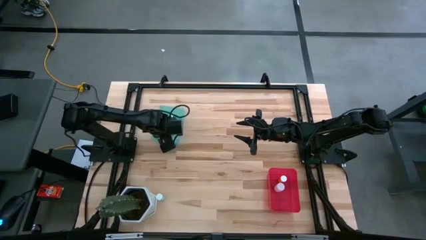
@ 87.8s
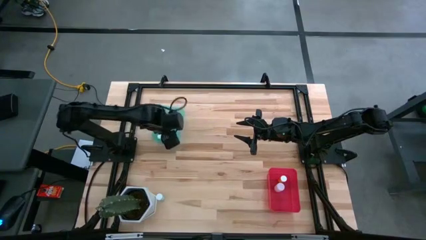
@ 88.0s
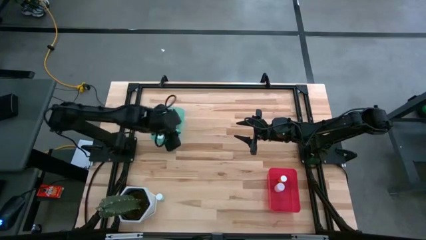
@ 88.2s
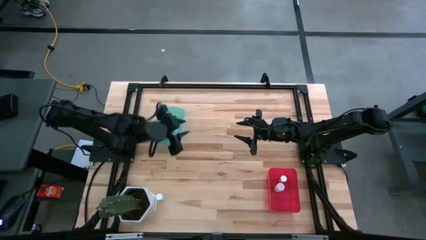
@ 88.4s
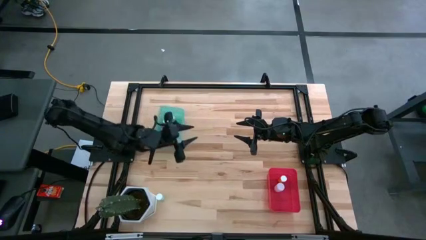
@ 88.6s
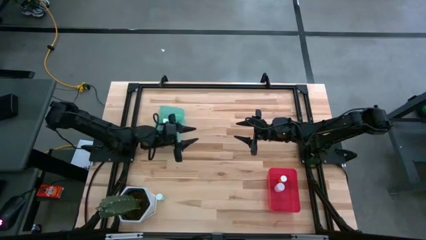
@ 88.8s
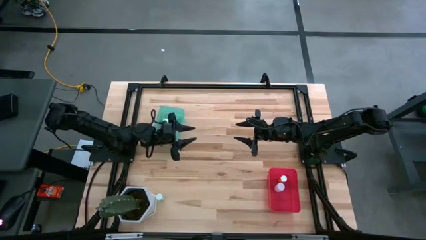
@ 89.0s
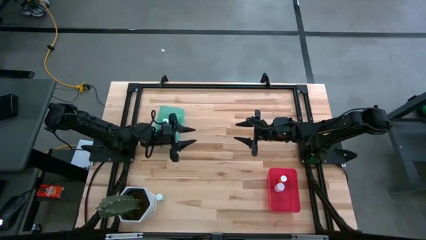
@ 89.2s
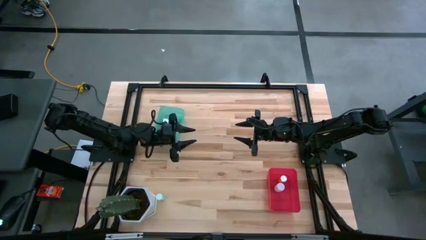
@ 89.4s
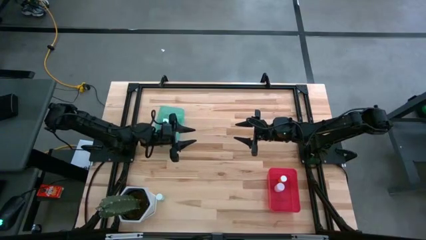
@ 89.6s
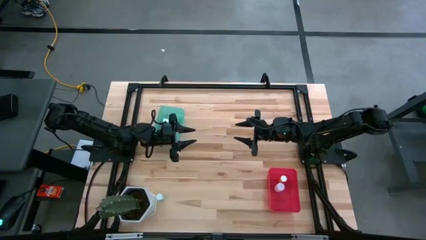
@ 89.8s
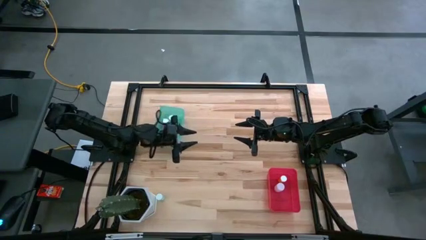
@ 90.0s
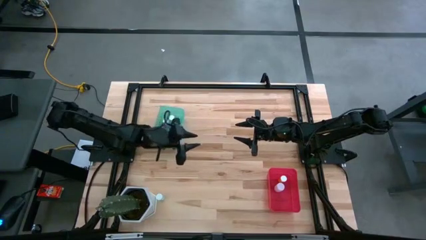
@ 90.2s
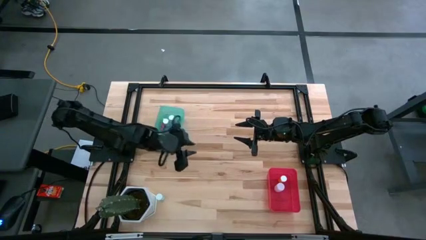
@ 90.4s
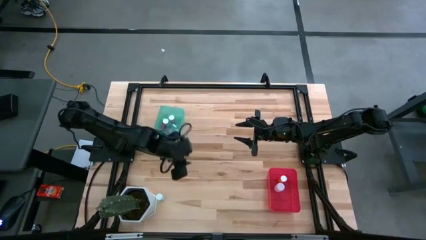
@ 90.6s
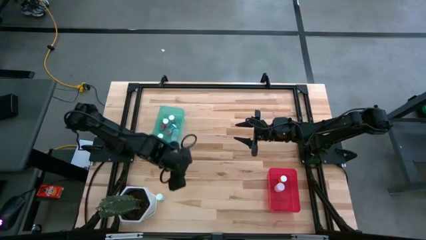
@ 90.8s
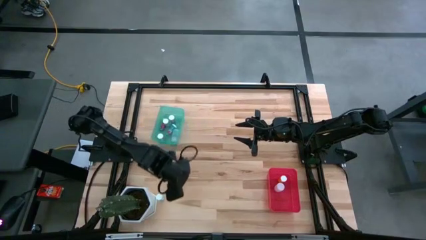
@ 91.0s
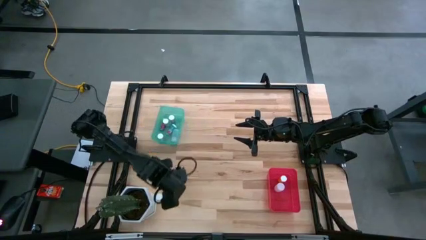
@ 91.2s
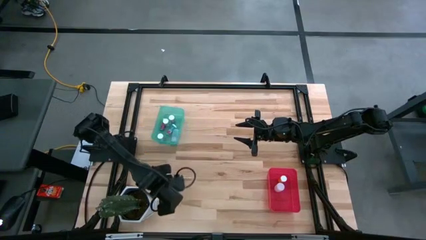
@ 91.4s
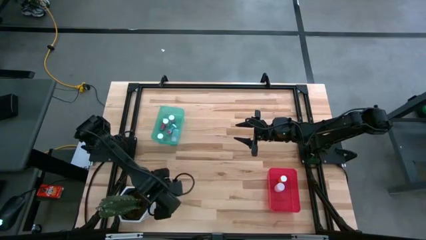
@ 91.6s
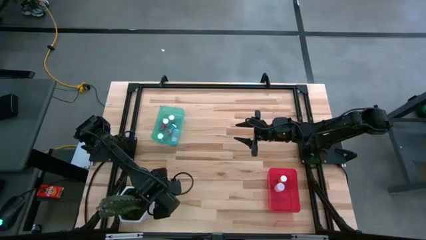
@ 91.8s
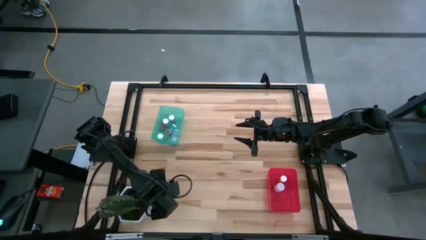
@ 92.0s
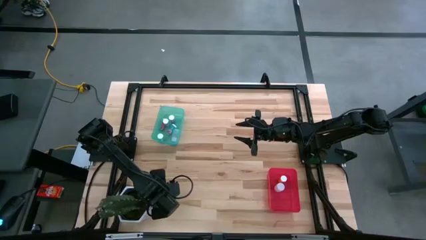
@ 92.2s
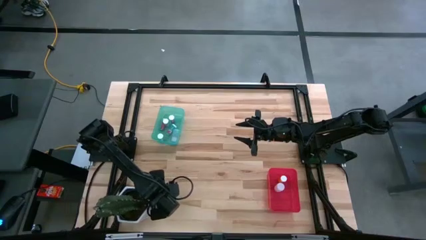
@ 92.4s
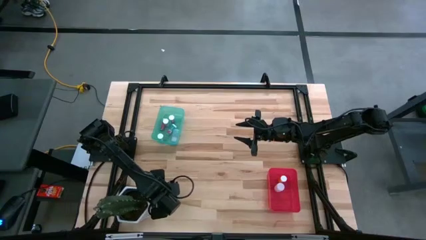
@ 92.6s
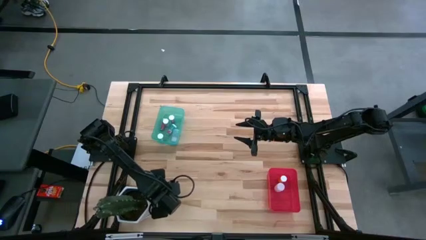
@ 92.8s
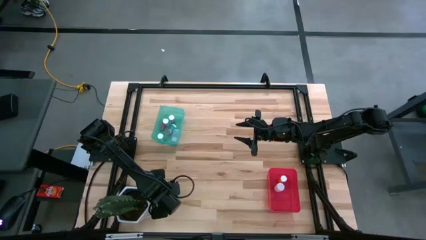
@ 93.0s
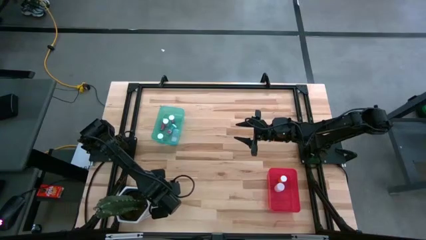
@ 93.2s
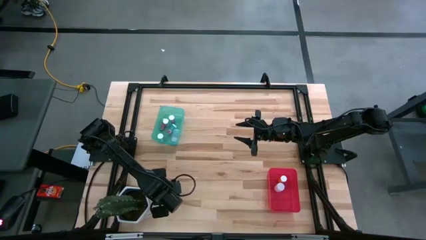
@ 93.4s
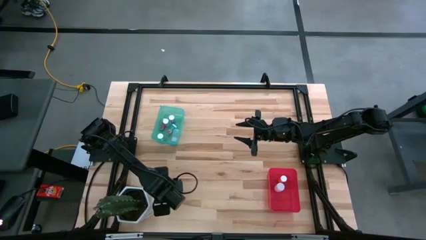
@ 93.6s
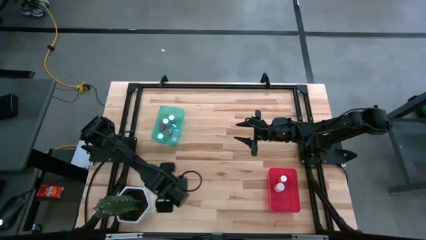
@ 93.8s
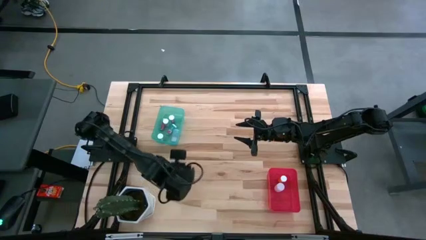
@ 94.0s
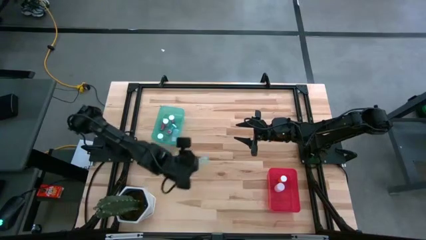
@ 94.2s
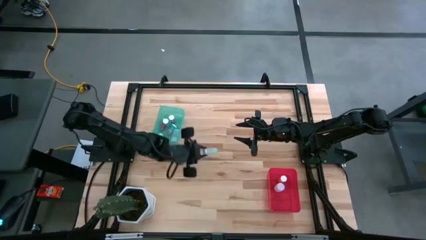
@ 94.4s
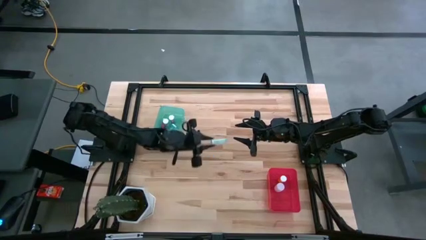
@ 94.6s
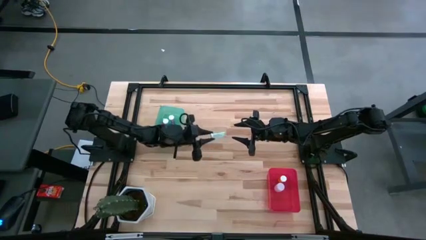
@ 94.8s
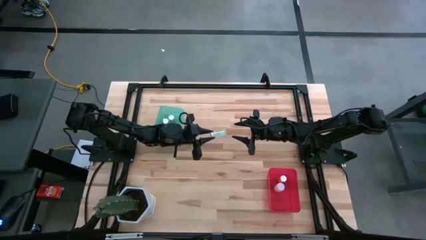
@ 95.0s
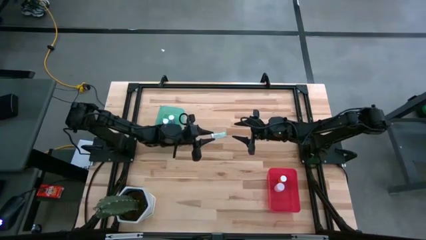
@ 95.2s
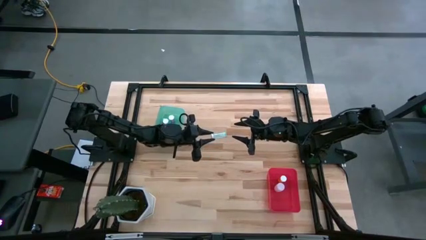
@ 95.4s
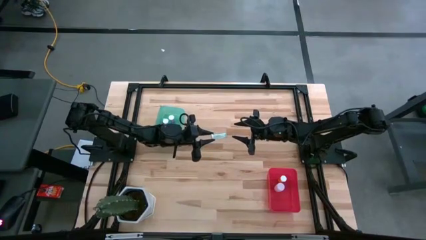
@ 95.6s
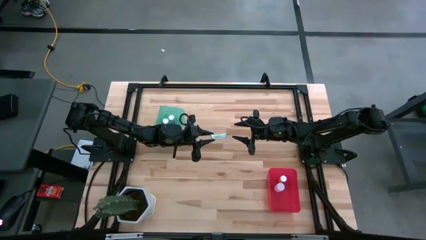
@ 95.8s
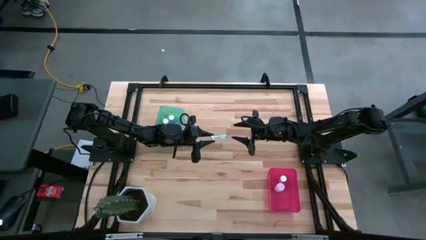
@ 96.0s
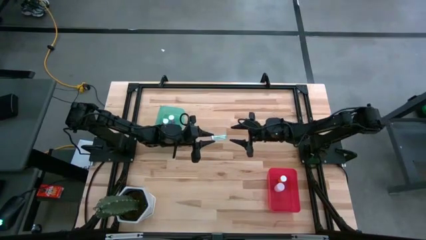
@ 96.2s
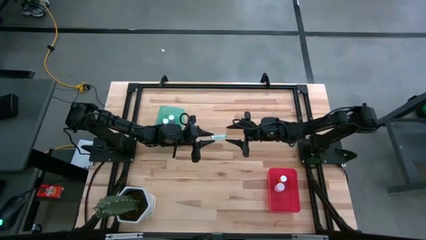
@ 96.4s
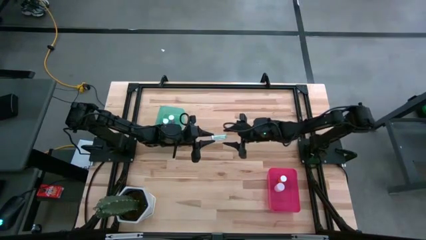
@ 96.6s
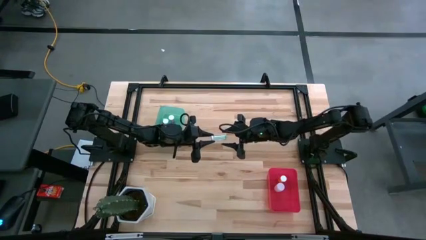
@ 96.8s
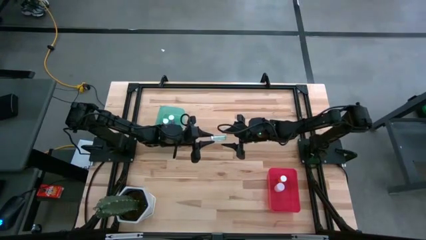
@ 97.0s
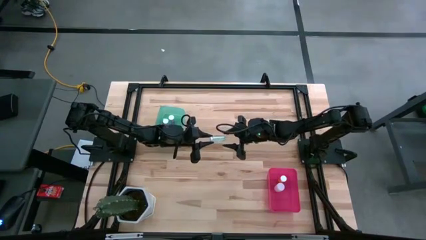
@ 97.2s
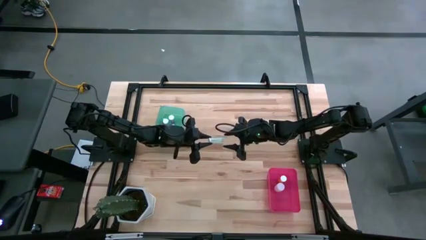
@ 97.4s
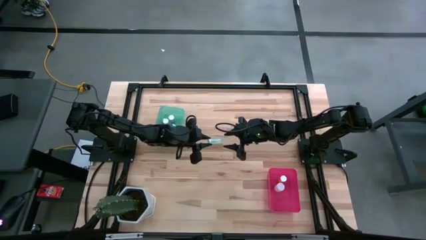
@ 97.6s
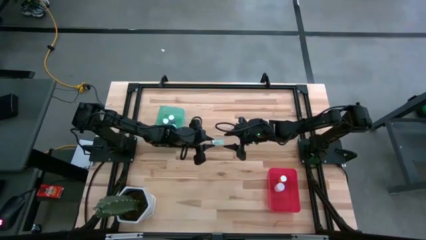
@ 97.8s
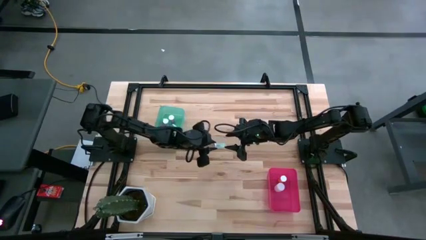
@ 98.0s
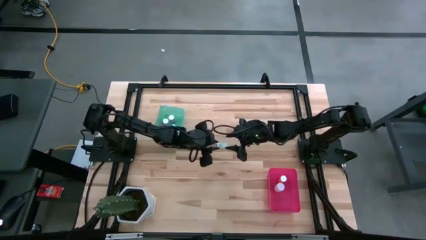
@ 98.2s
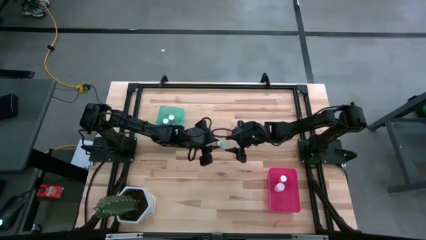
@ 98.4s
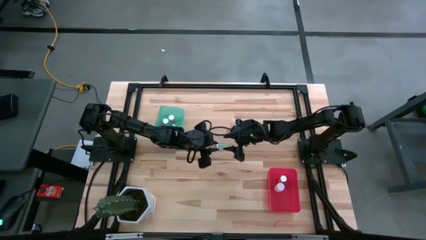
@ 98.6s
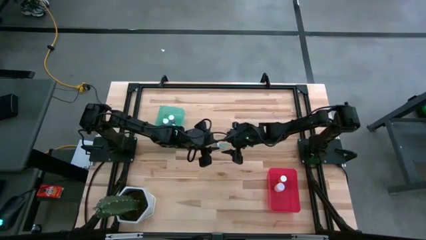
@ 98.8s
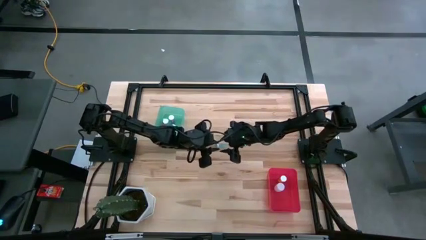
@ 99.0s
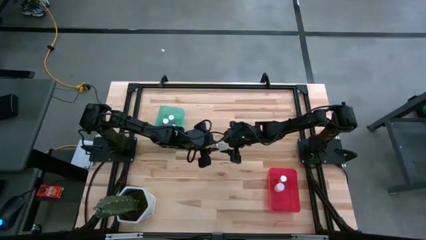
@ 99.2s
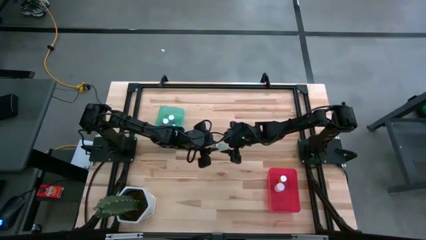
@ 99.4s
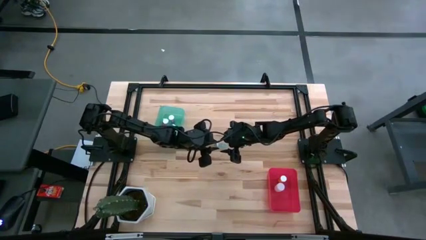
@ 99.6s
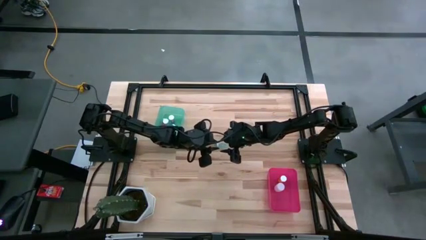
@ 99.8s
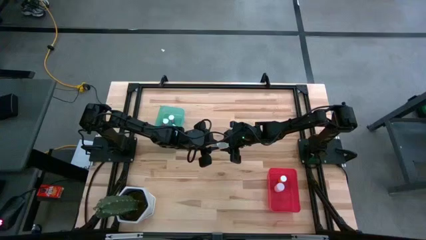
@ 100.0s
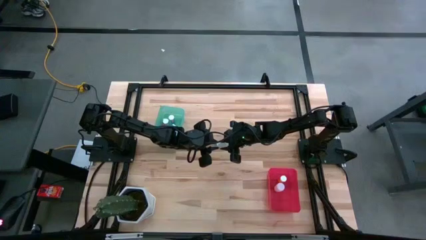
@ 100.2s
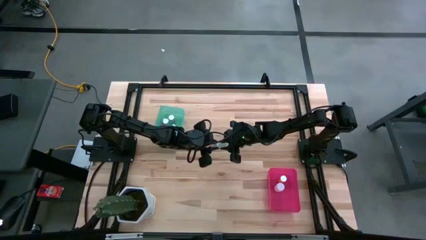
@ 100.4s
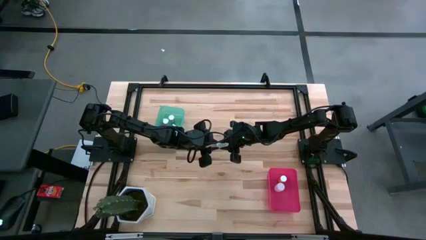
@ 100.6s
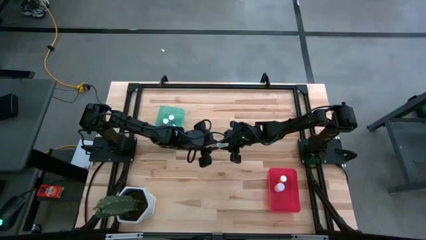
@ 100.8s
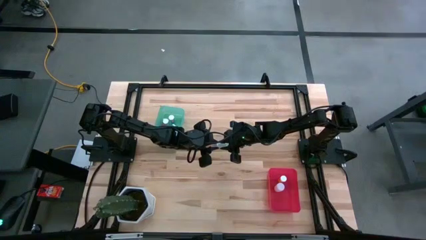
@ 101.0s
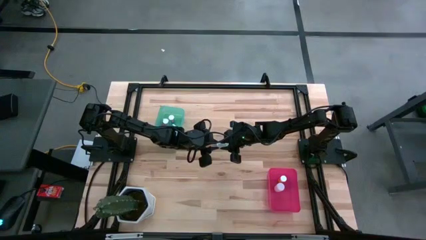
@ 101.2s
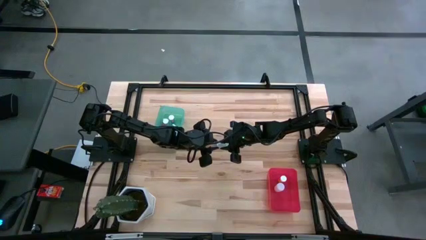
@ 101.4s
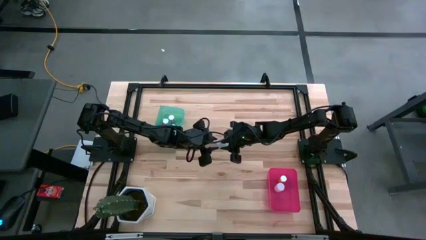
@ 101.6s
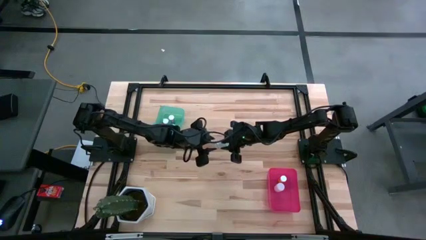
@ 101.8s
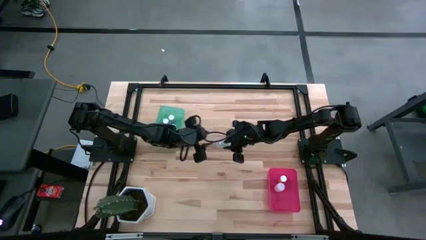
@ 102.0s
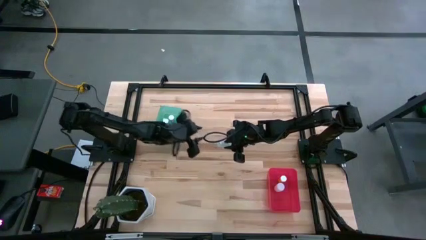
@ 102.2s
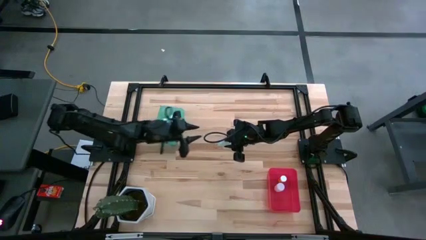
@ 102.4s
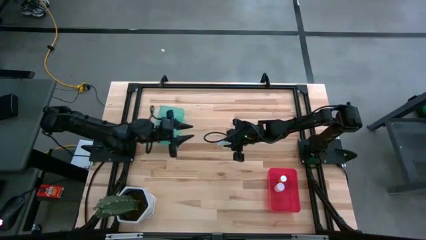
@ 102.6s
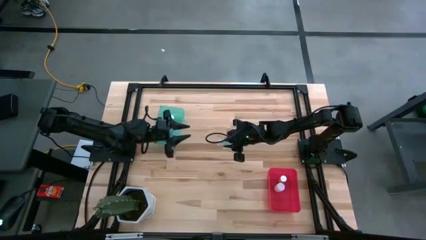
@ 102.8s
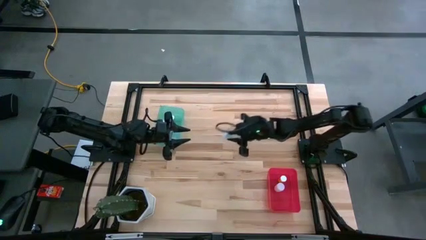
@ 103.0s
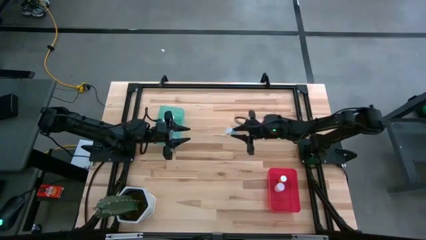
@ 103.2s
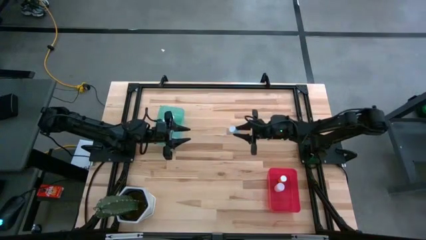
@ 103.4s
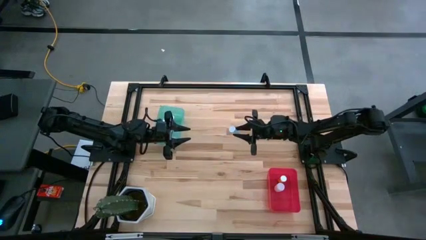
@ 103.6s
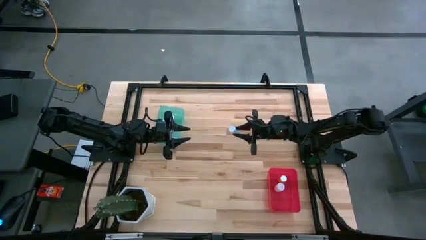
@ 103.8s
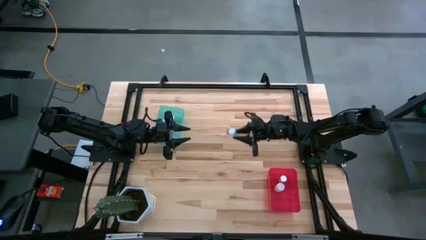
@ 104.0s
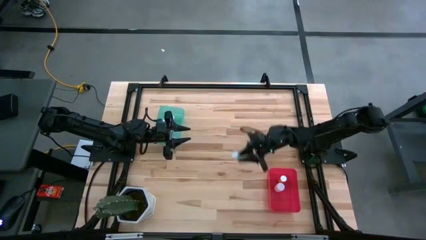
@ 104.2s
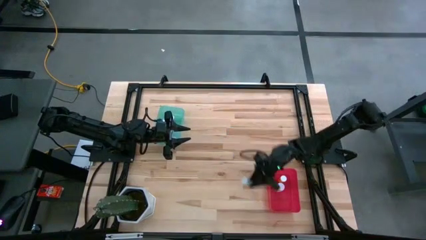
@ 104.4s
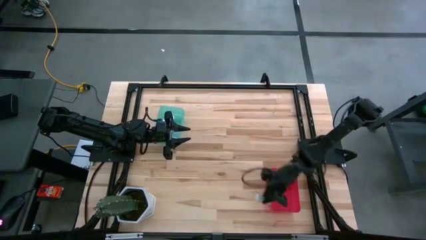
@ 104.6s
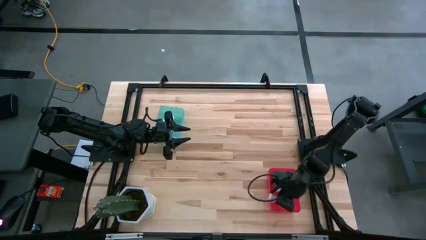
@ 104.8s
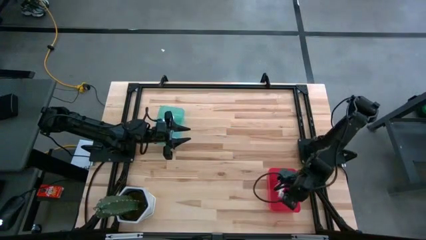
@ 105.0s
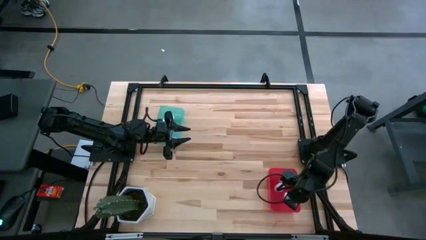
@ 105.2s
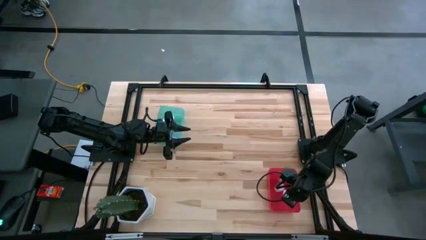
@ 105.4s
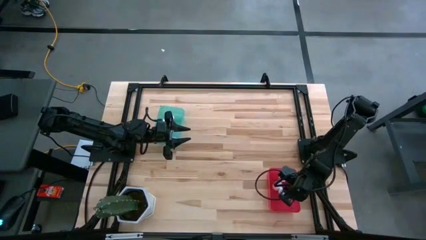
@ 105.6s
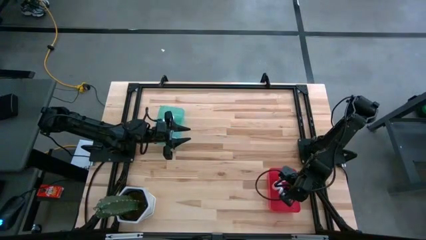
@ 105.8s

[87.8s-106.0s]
Task: Pick and place medicine bottles into bin by pill shape (circle, oval)
Put the blue tablet bottle into the red bin
